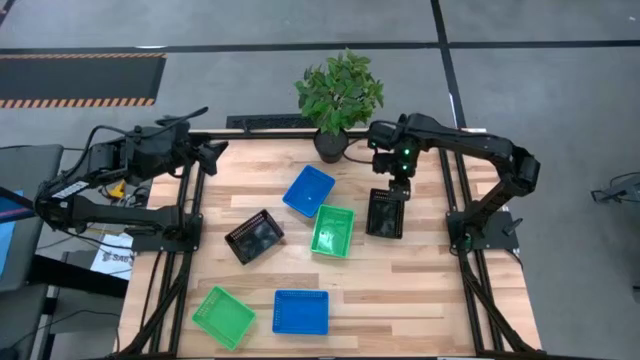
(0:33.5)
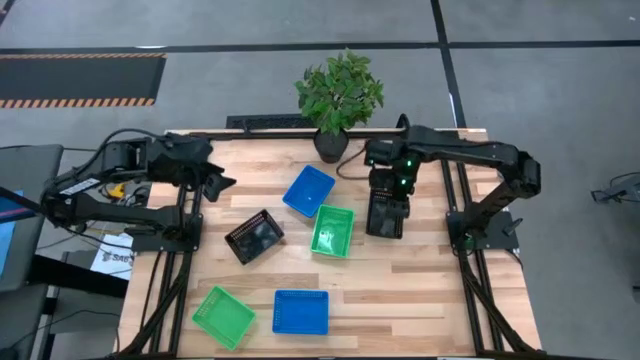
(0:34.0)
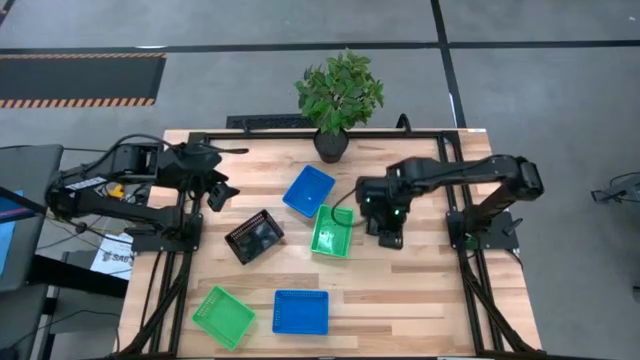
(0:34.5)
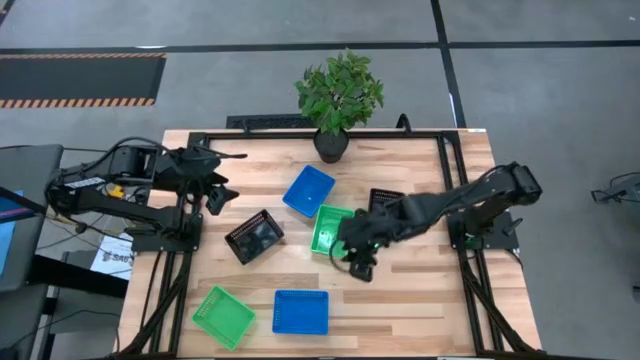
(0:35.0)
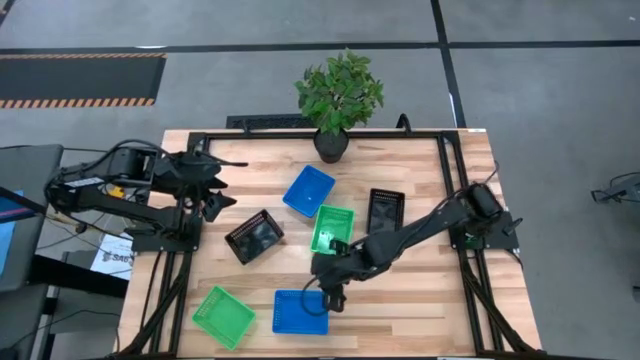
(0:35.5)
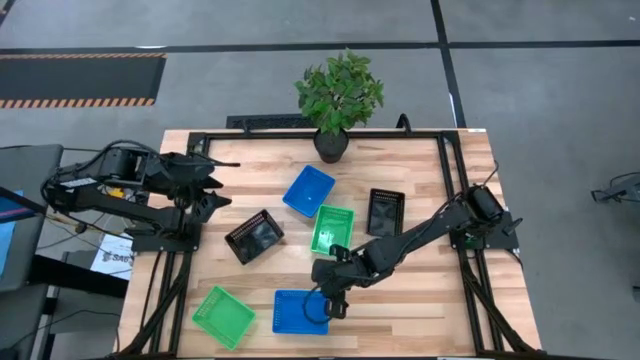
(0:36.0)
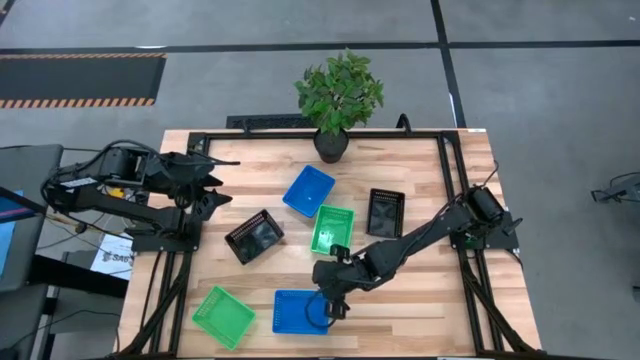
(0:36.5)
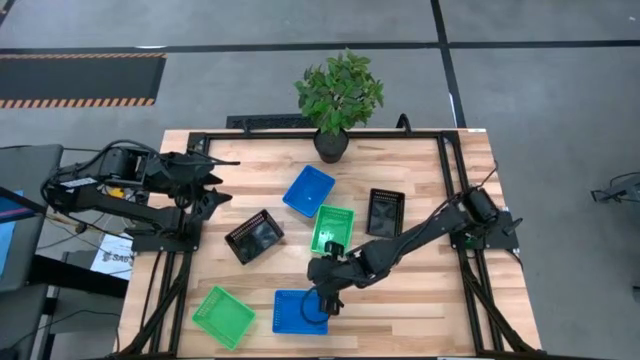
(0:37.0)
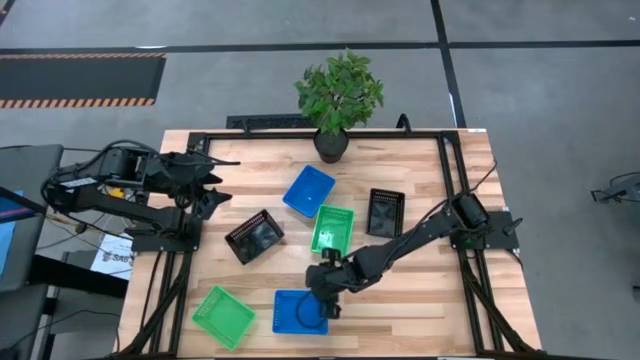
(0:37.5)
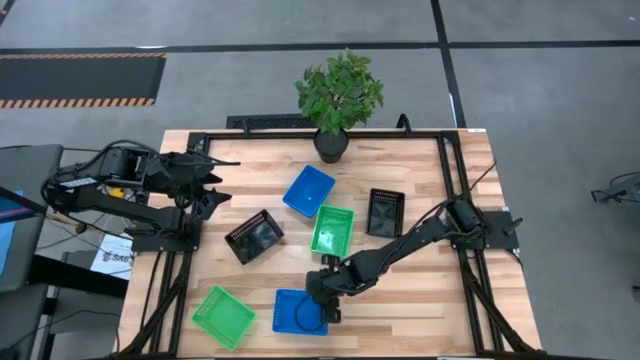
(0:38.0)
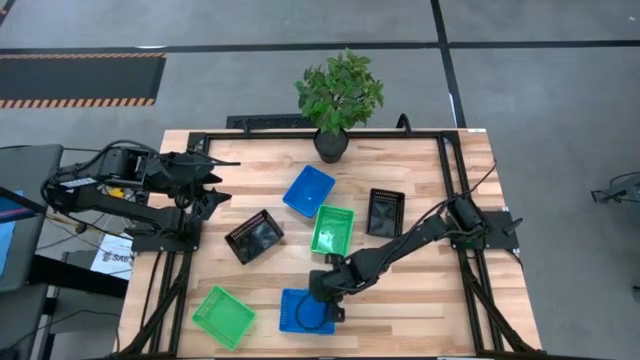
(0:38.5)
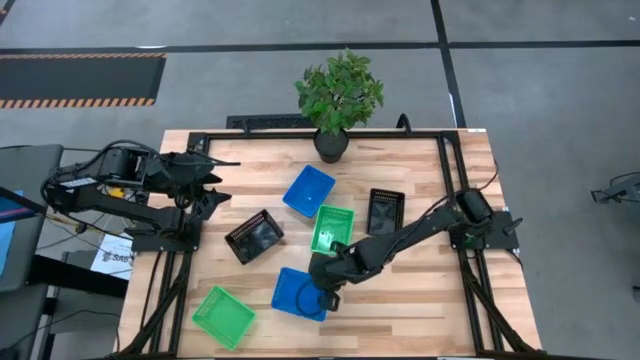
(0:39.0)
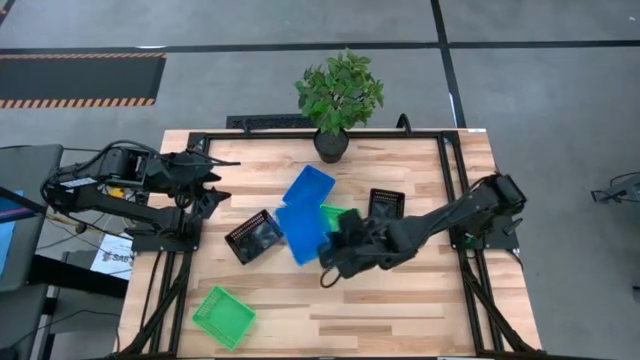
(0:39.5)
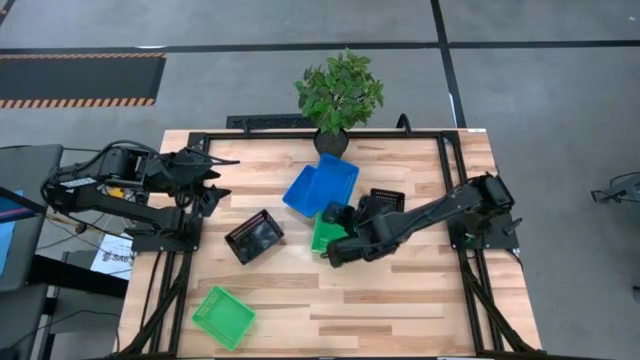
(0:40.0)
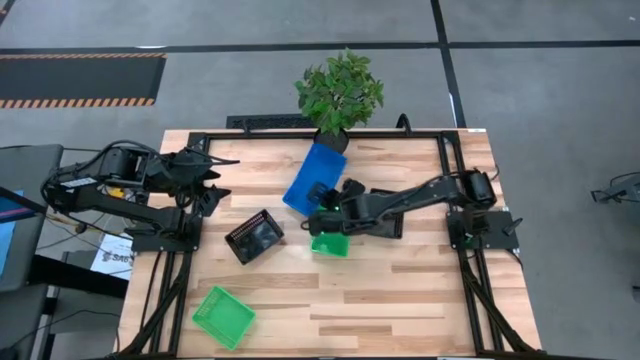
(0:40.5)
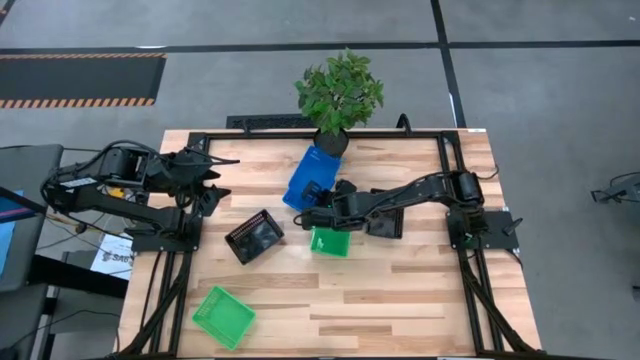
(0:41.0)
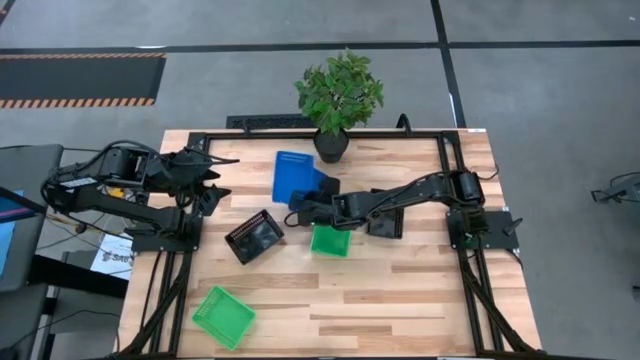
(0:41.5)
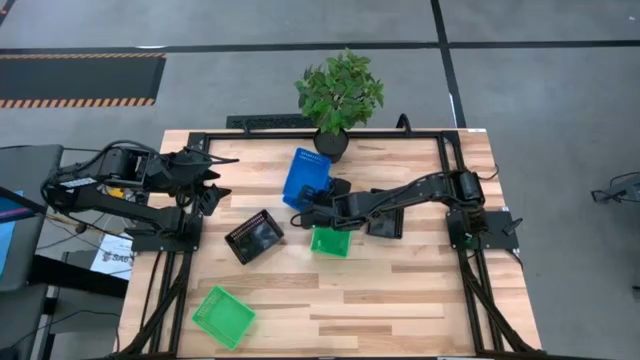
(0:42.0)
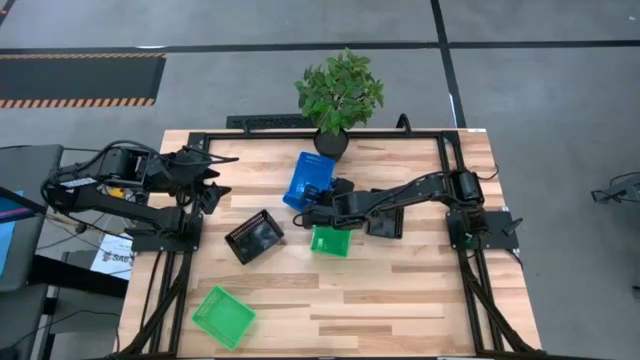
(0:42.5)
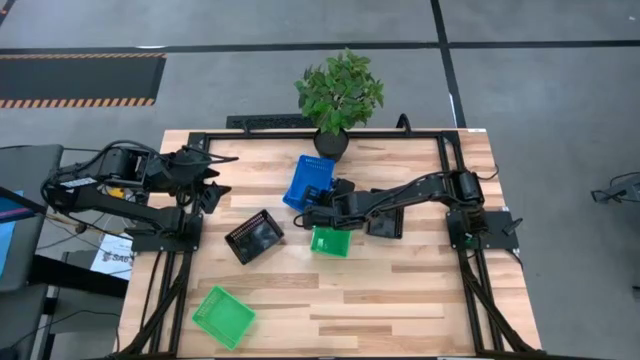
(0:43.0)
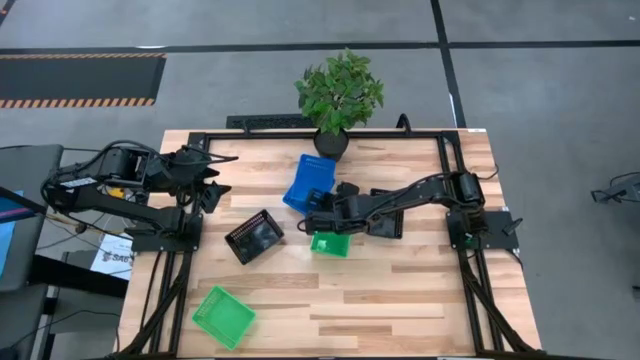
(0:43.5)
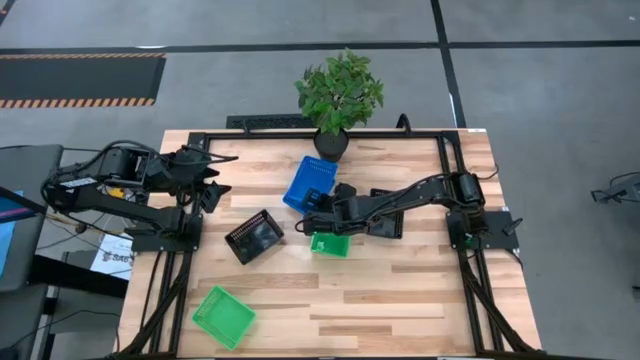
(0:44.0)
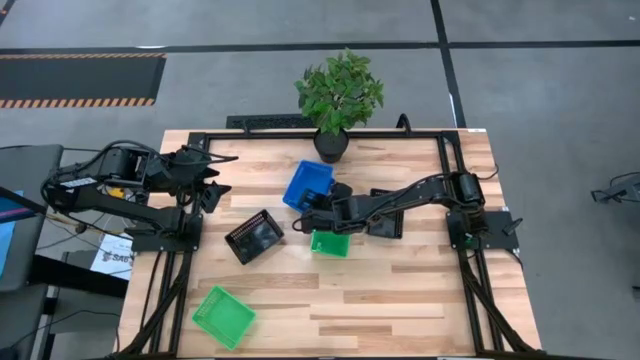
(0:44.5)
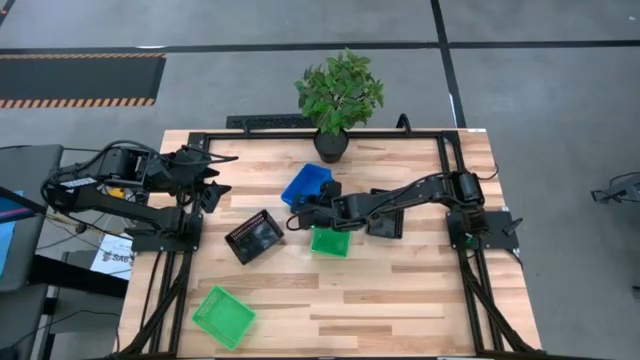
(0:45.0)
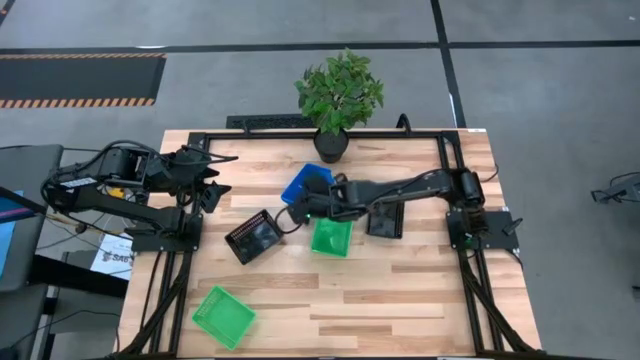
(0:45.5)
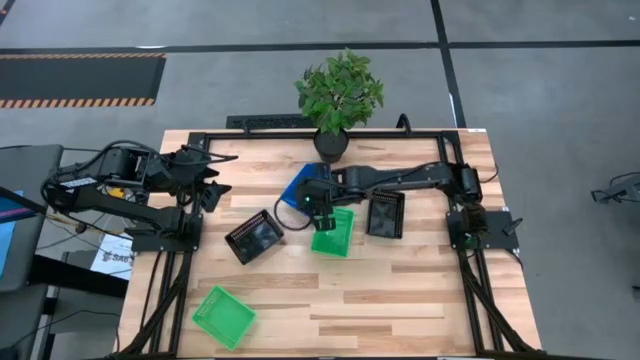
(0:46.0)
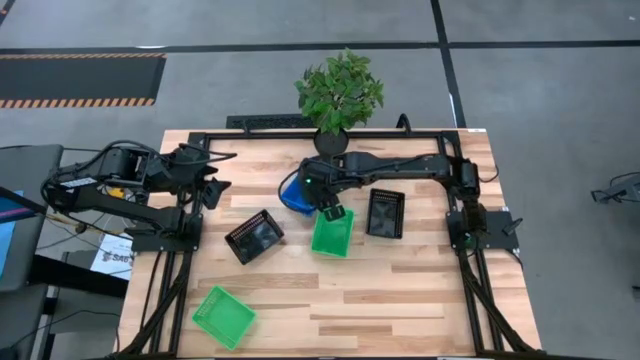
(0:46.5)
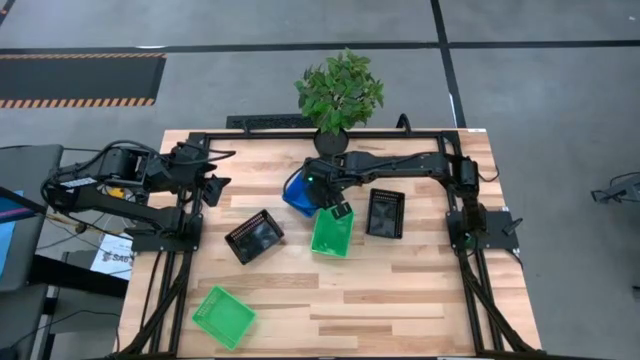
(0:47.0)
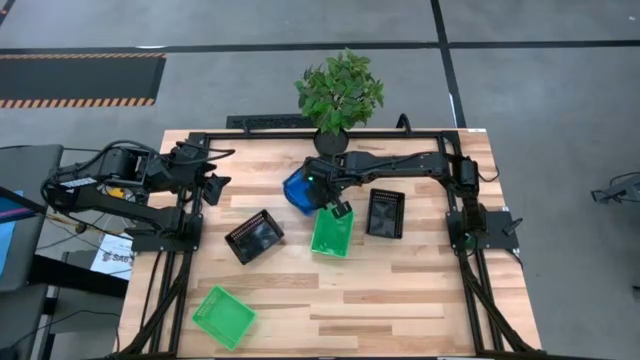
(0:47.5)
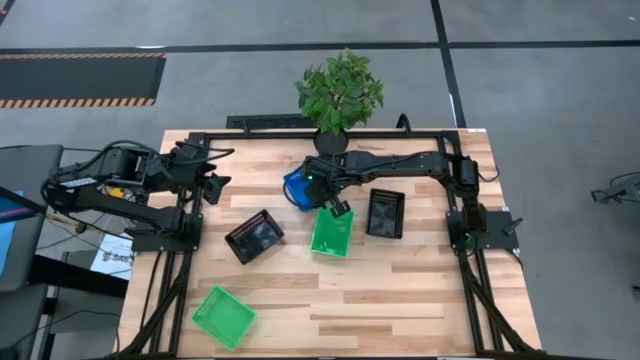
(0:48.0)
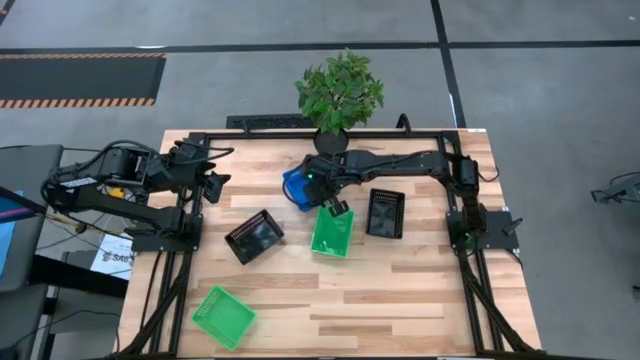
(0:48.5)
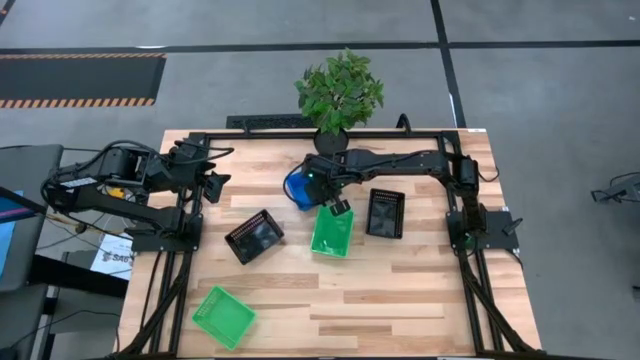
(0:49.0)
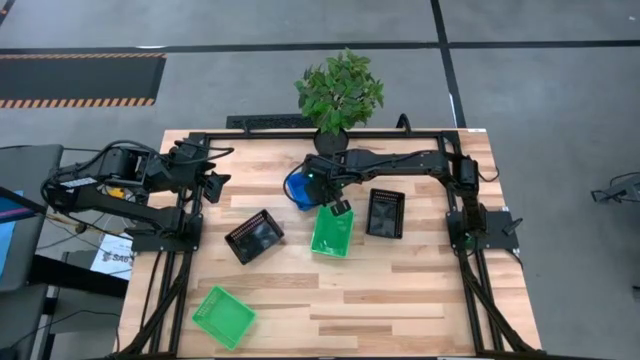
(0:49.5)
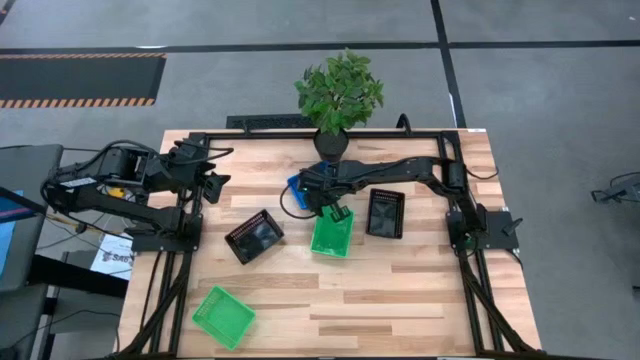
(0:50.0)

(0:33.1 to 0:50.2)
Stack the blue bin on the top blue bins

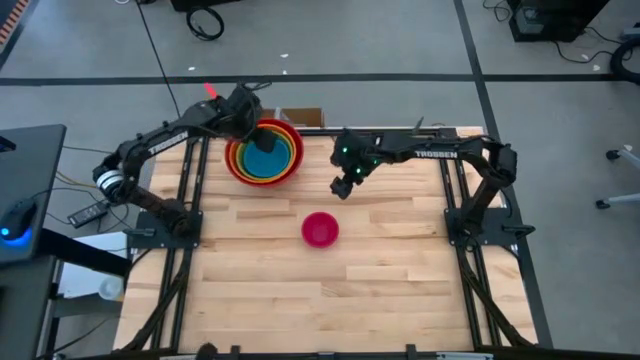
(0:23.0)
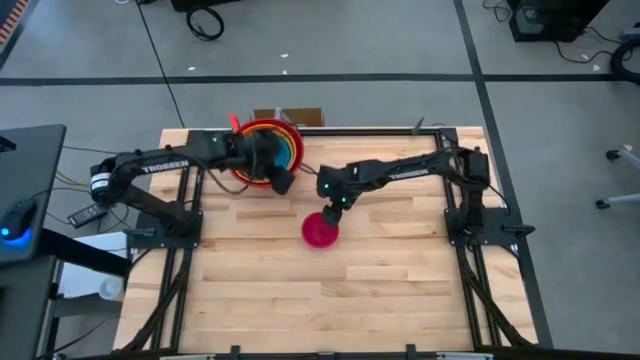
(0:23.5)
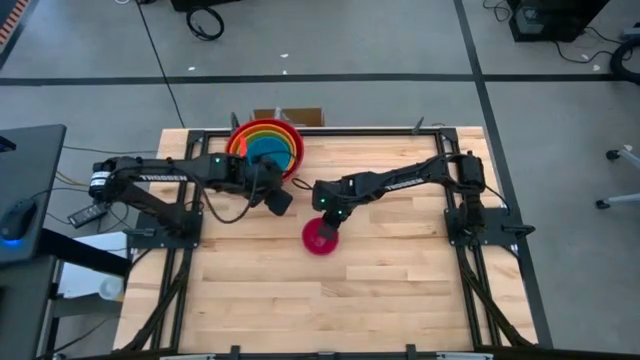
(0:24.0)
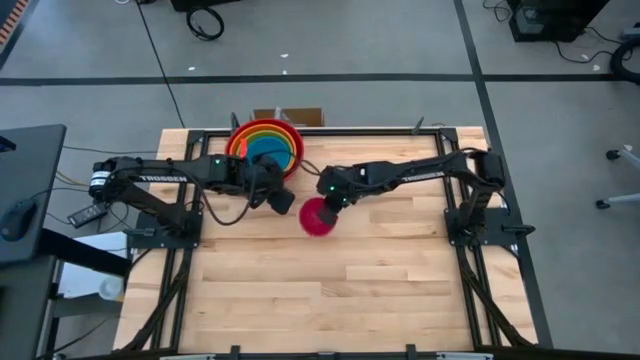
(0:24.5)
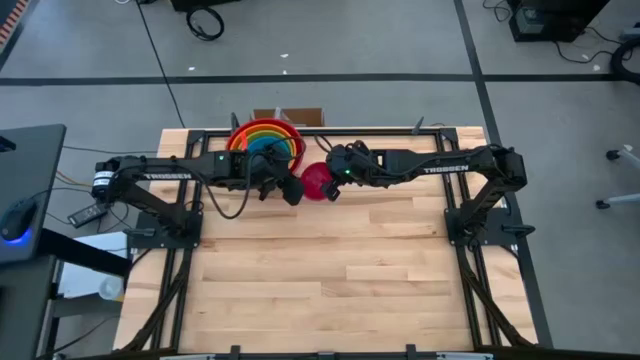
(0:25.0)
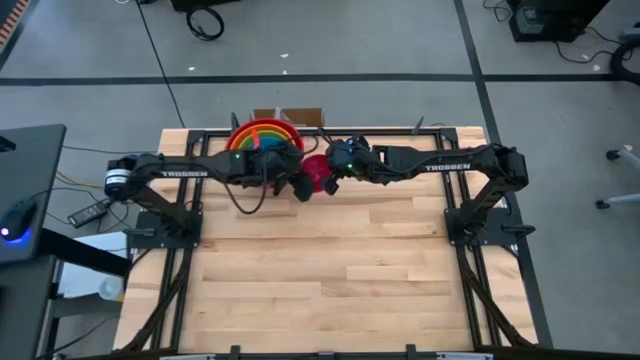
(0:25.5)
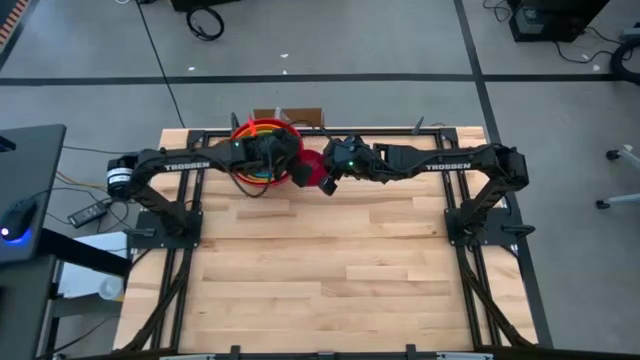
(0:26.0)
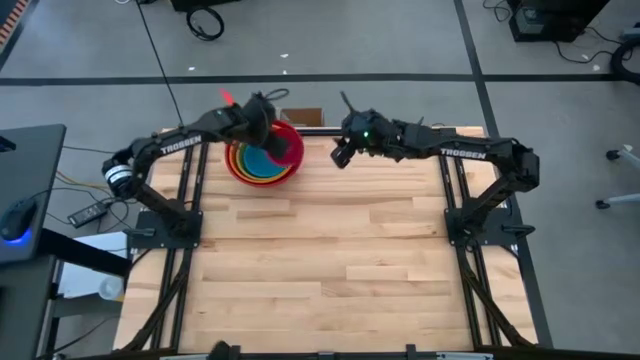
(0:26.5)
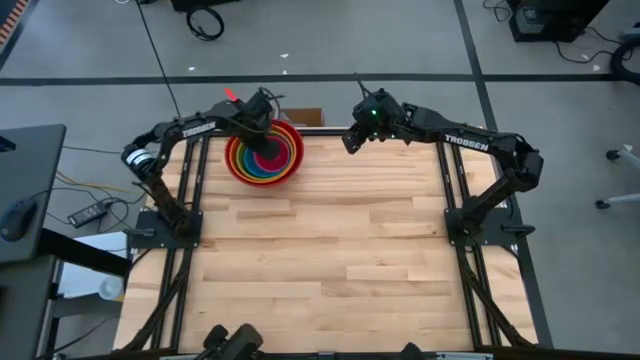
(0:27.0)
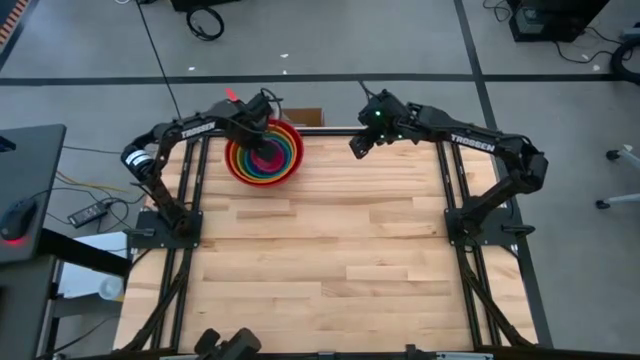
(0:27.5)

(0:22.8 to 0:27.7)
Stack the pink bowl on top of the blue bowl
